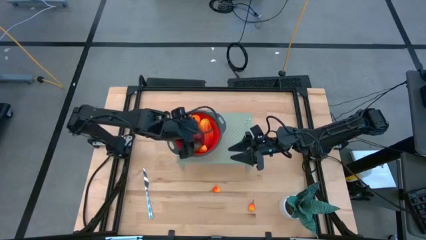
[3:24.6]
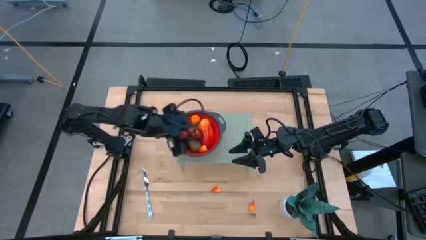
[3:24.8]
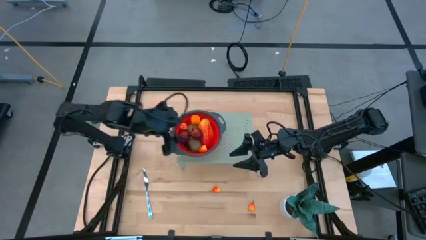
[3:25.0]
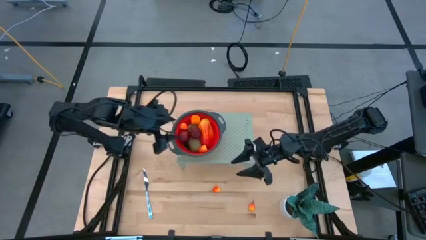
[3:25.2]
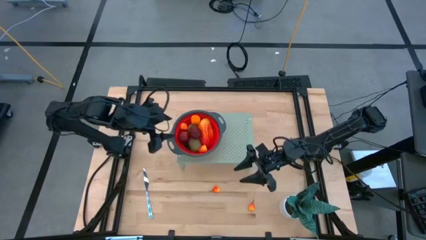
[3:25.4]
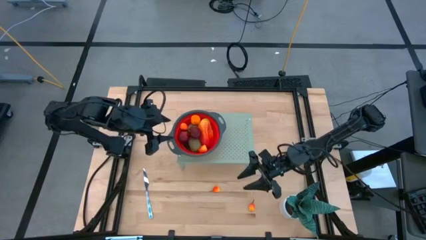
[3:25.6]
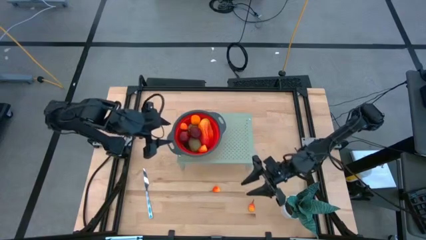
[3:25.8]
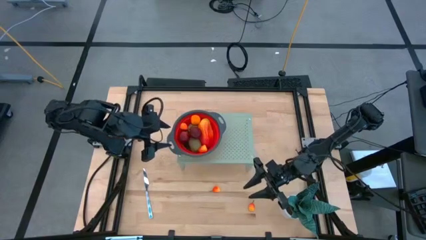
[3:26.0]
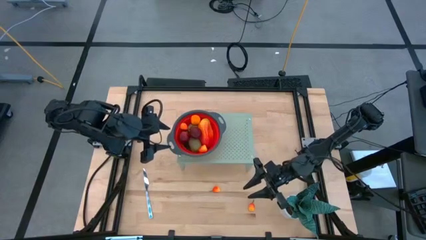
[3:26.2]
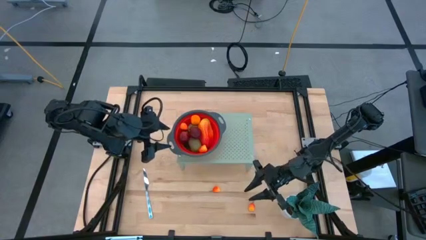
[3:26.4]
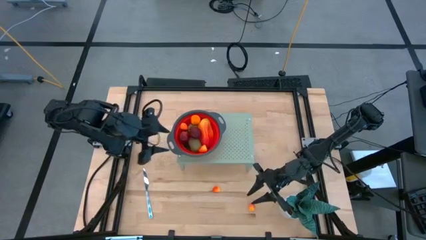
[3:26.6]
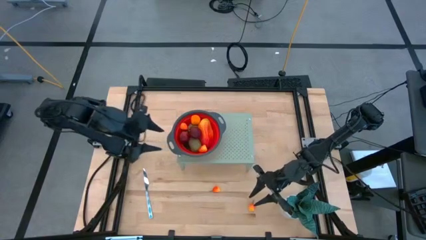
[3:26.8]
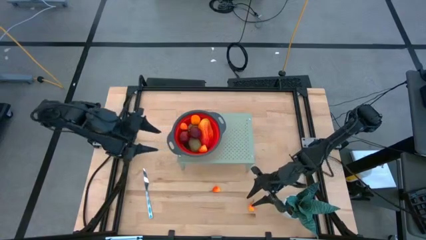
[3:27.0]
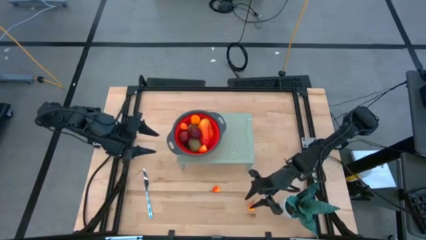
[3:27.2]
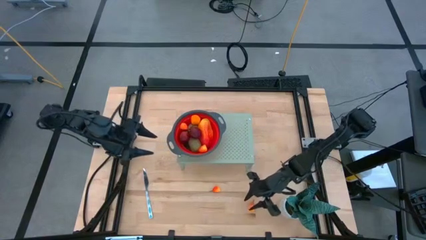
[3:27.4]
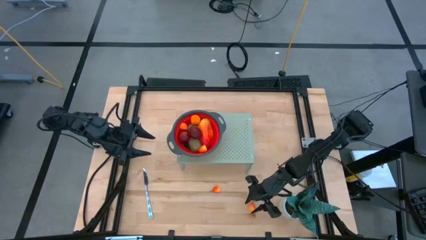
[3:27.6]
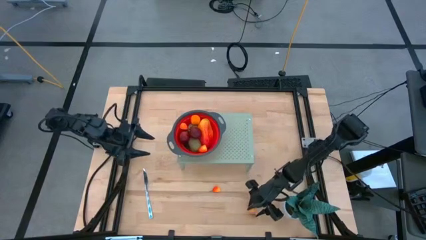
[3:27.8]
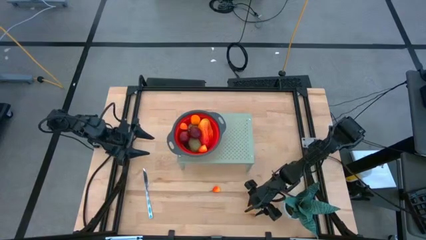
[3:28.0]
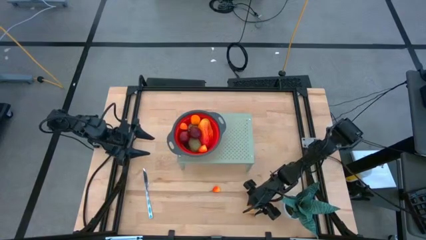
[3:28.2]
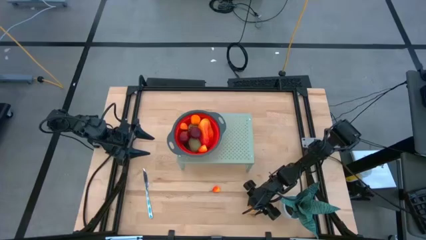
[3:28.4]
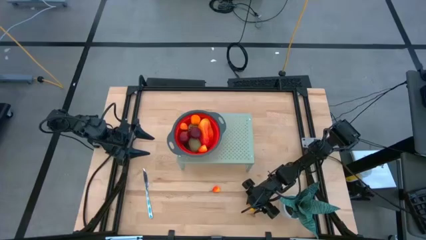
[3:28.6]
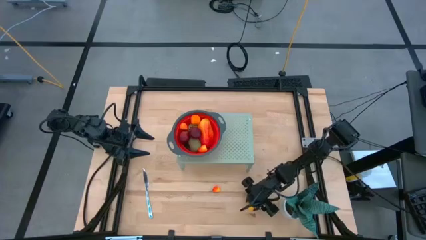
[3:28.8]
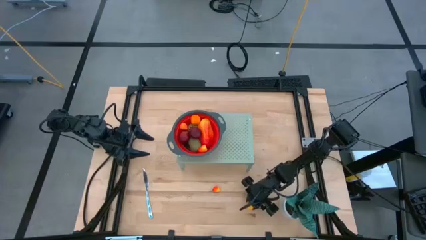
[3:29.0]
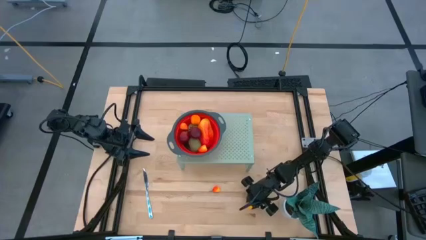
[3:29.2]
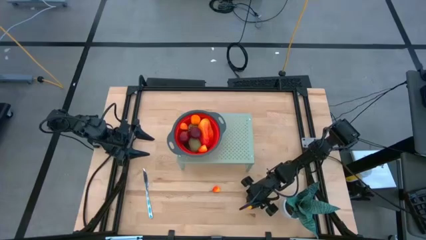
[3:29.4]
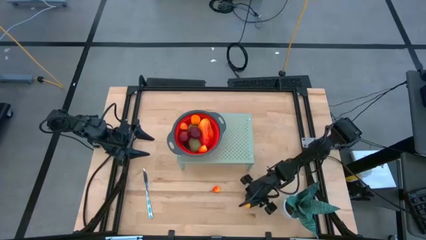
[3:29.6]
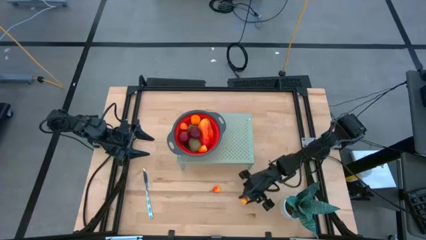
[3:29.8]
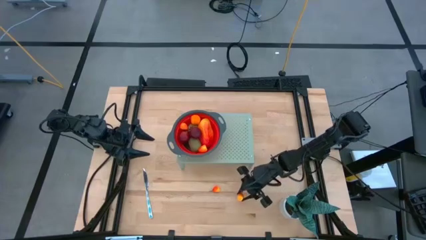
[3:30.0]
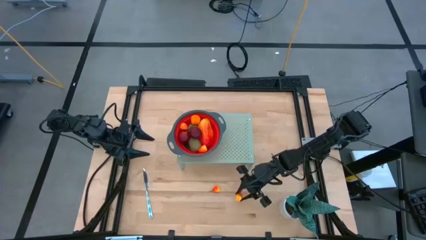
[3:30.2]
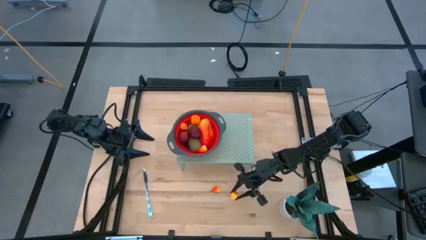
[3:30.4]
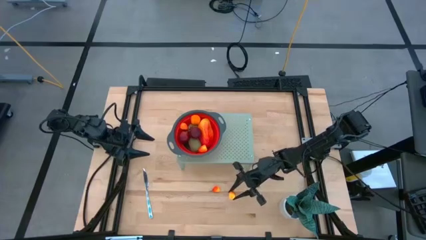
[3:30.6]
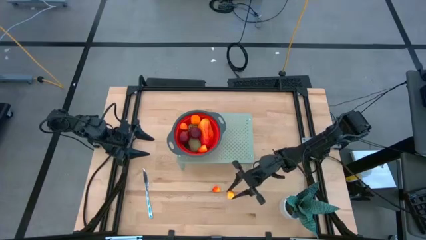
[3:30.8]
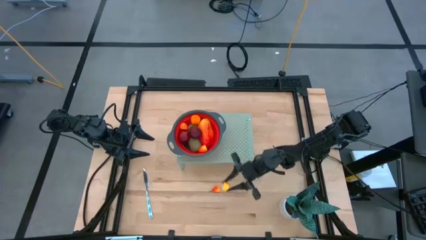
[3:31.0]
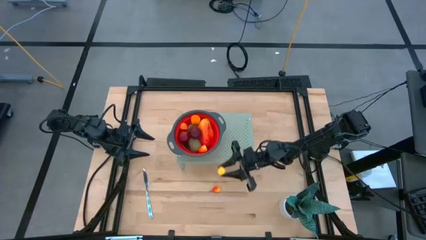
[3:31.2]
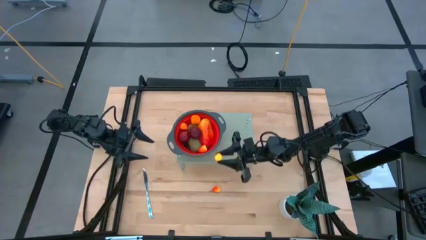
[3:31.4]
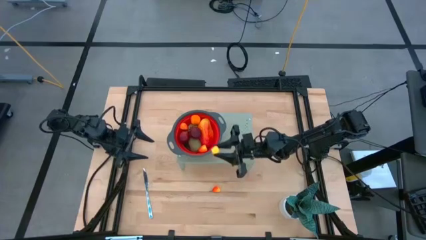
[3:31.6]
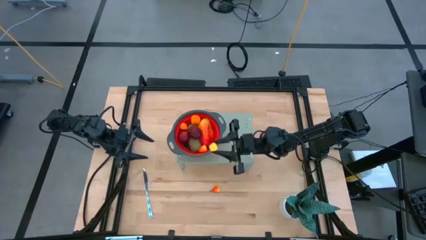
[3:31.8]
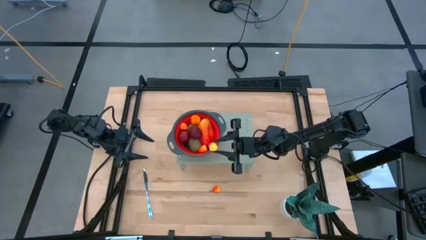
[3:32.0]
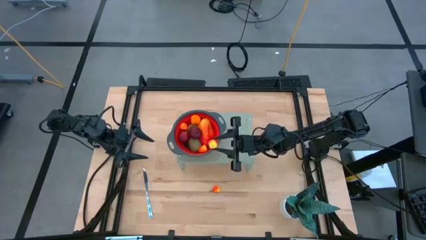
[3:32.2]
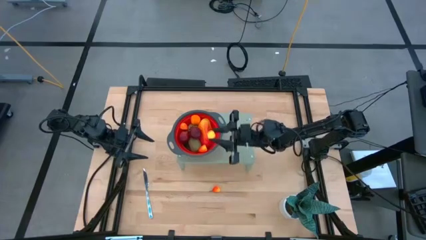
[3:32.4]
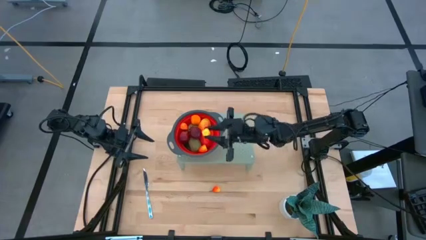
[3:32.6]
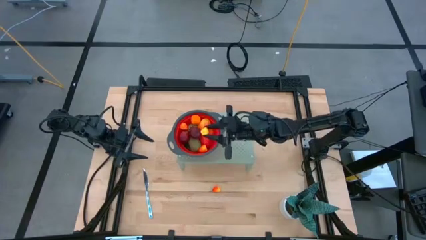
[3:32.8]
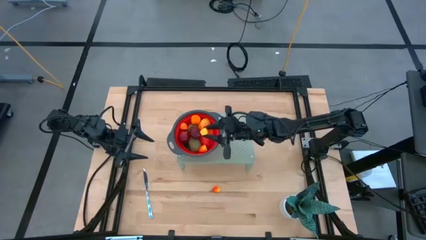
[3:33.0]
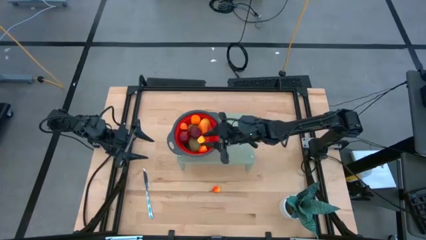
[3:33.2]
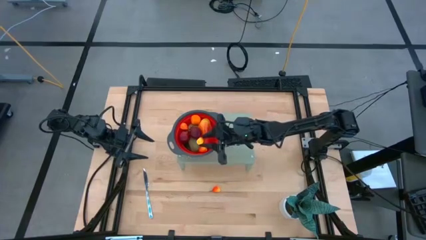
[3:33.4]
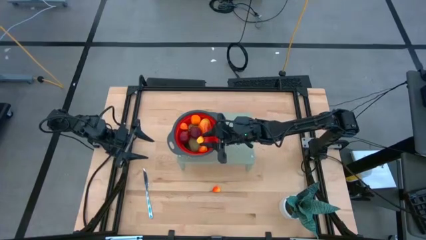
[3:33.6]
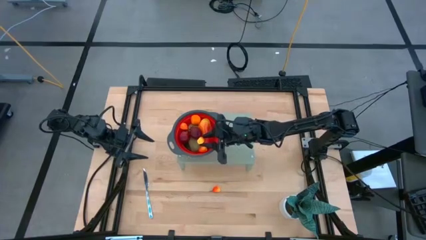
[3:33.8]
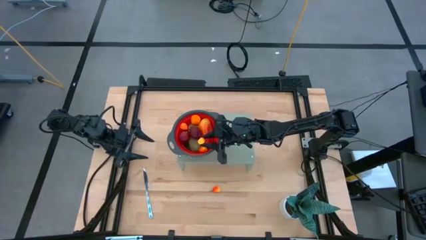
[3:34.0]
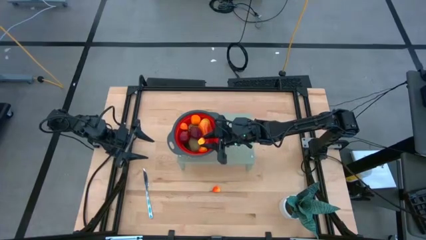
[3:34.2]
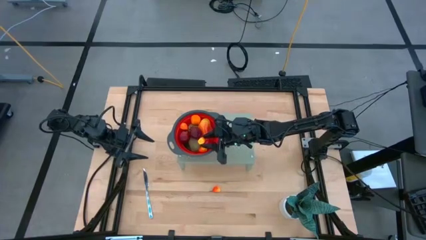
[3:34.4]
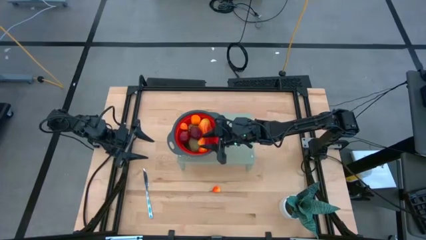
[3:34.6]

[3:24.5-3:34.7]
Task: Pick & Place Fruit
Put the peach fruit into the strainer

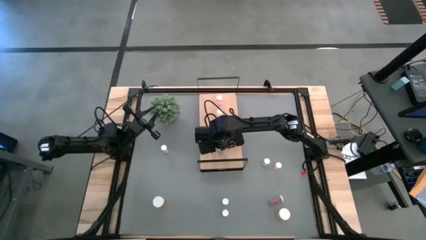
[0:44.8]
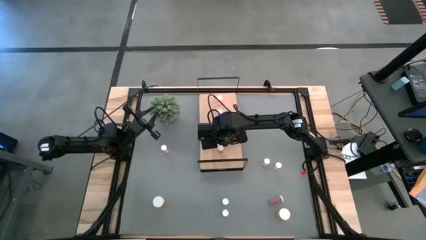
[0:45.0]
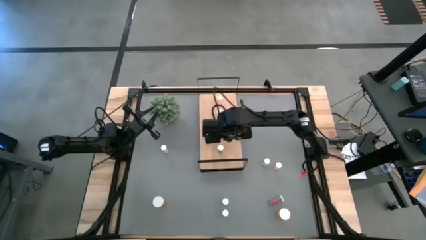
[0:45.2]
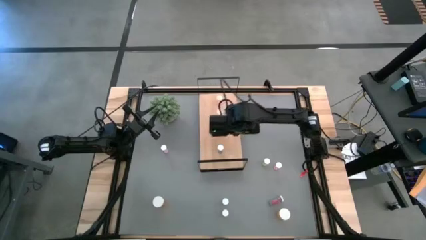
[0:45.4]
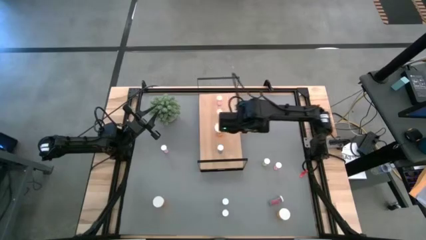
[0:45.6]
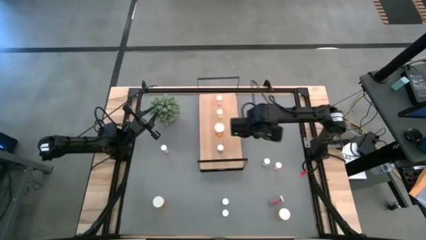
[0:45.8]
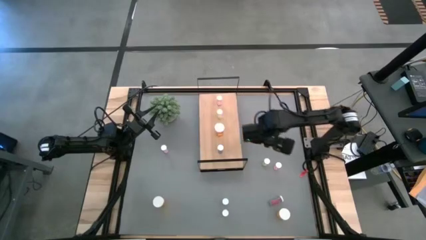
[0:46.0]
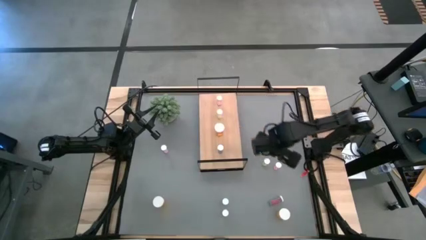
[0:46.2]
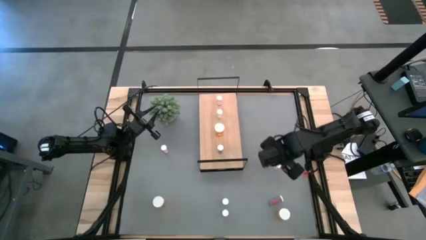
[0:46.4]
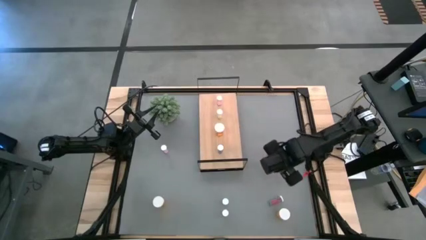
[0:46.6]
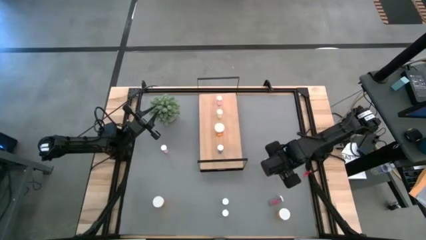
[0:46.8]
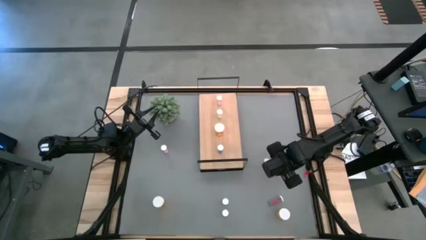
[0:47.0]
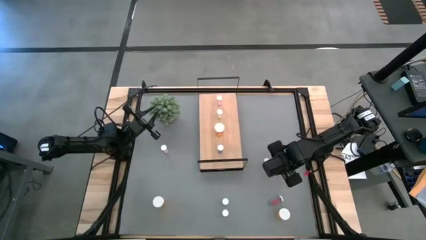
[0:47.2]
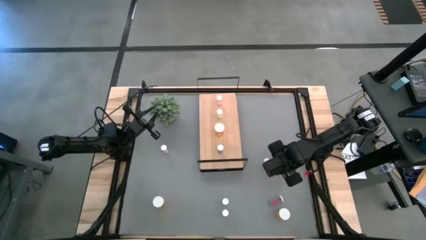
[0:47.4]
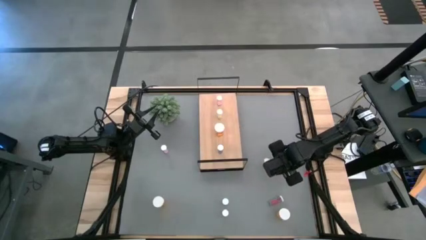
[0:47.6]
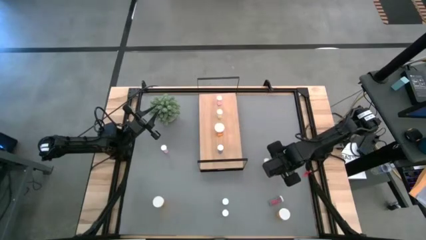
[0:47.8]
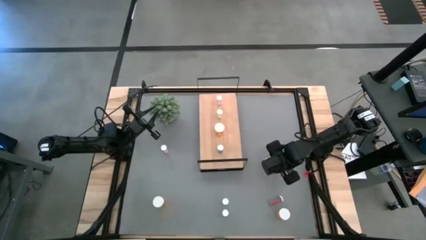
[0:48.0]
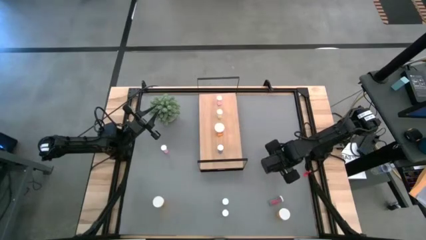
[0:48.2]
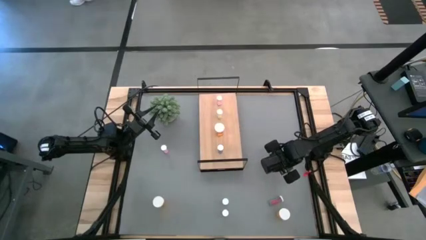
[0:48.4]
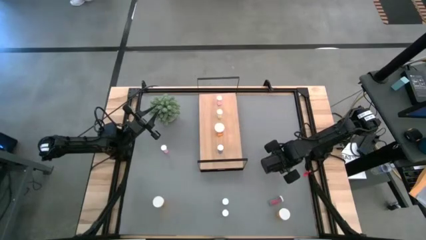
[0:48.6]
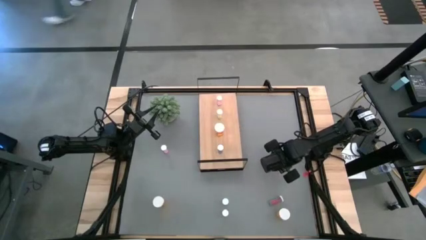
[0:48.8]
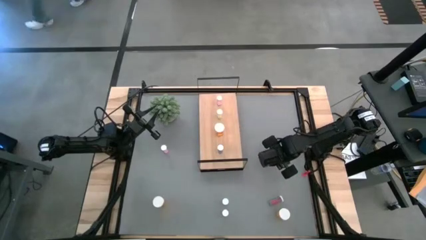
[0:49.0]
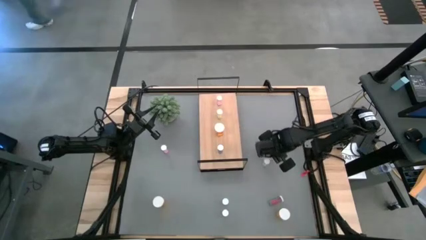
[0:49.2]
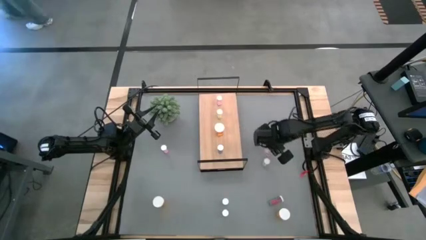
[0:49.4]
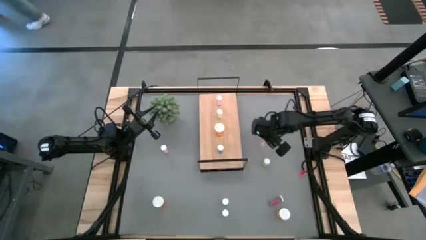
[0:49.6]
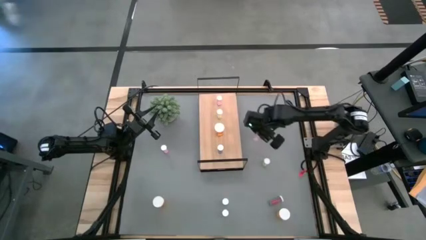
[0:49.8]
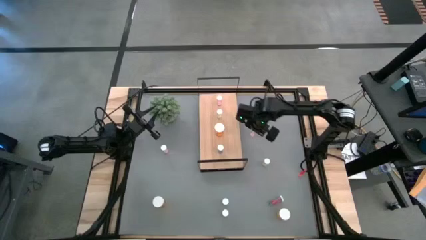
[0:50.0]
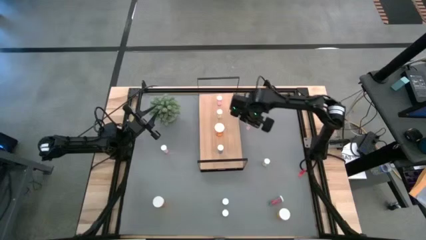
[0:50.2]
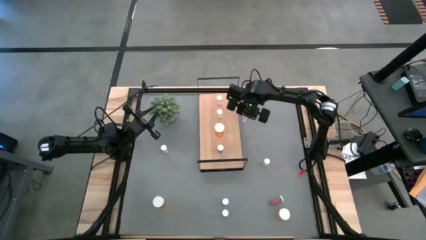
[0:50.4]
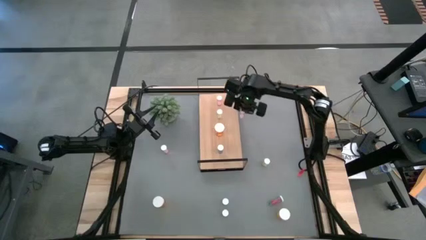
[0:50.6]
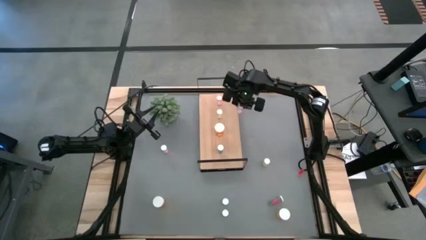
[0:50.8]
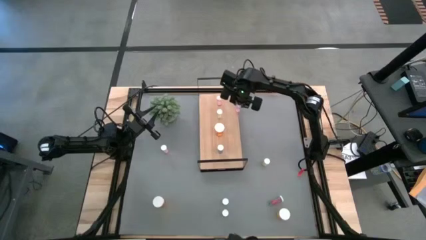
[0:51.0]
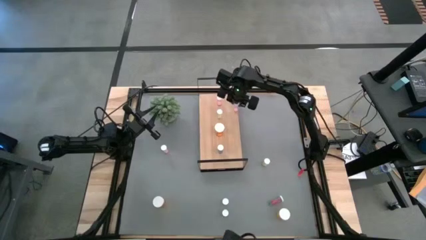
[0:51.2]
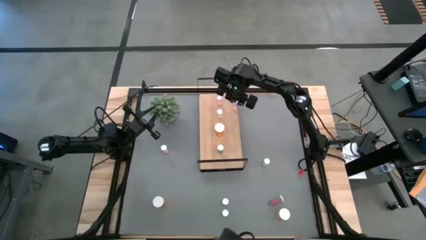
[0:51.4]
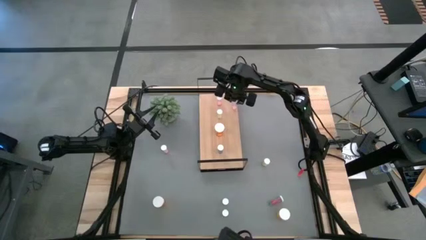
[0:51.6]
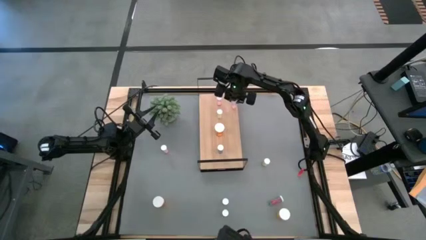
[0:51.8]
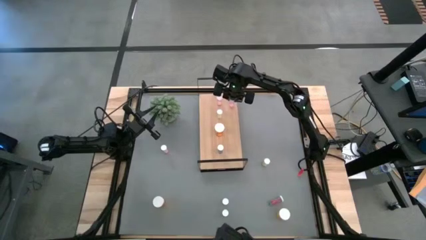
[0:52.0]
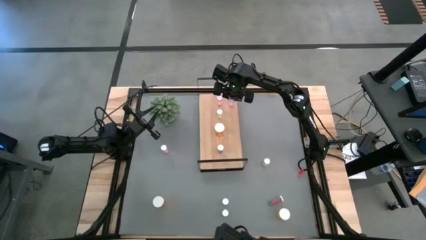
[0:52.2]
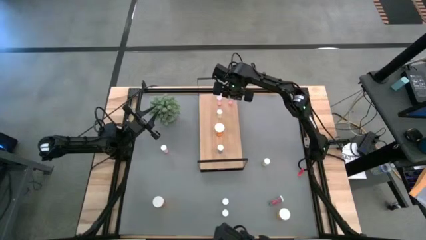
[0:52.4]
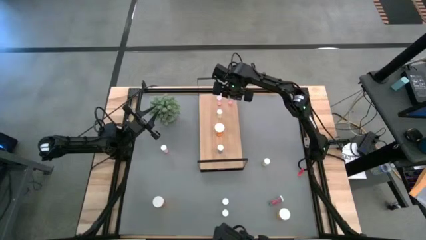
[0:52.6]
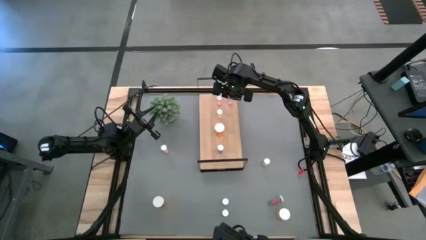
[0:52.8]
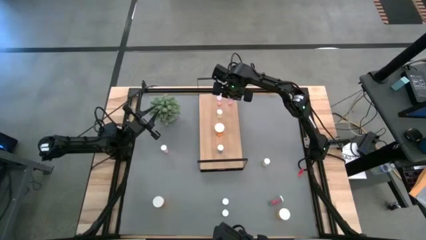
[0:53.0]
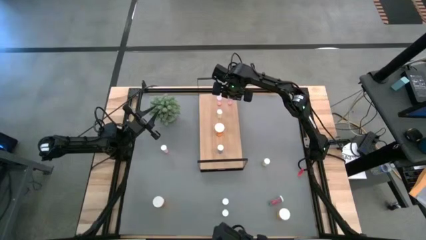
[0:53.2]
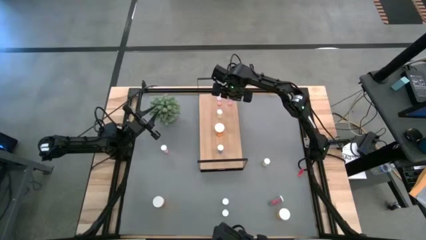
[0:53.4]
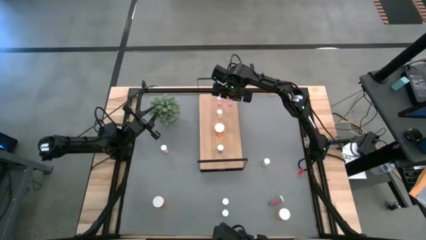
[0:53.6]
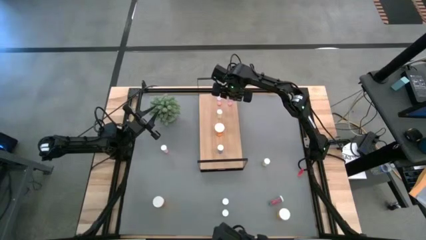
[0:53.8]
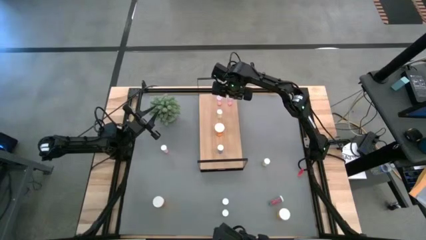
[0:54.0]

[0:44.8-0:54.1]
Task: Pick and place medicine bottles onto shelf by color
Put the right pink pill bottle aligned with the other pink pill bottle on the shelf
